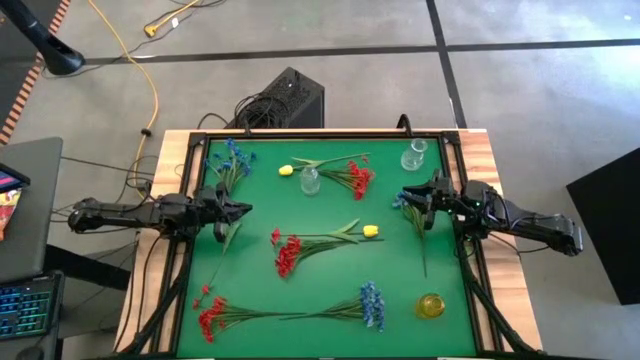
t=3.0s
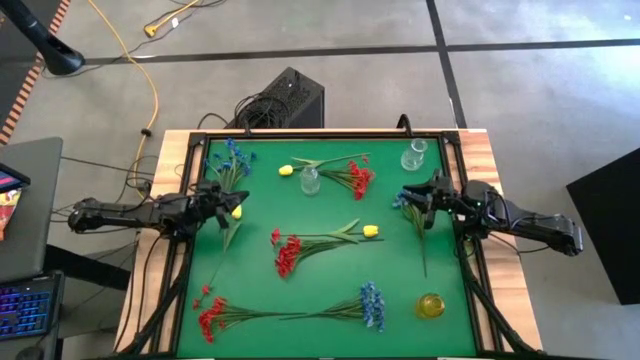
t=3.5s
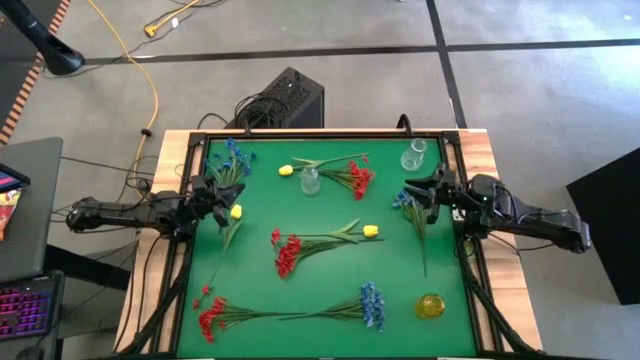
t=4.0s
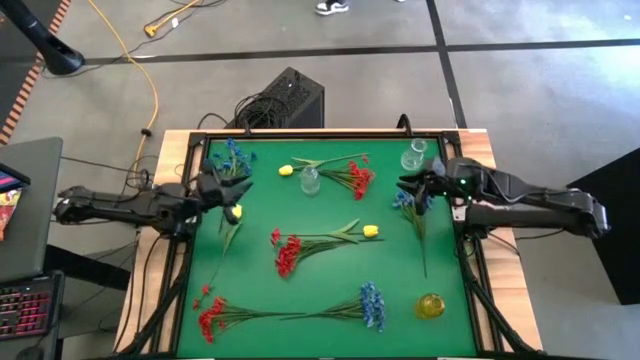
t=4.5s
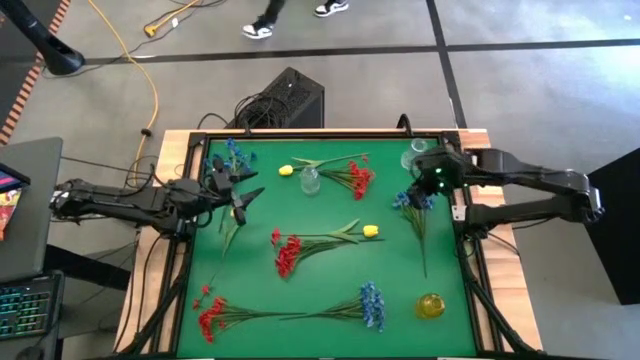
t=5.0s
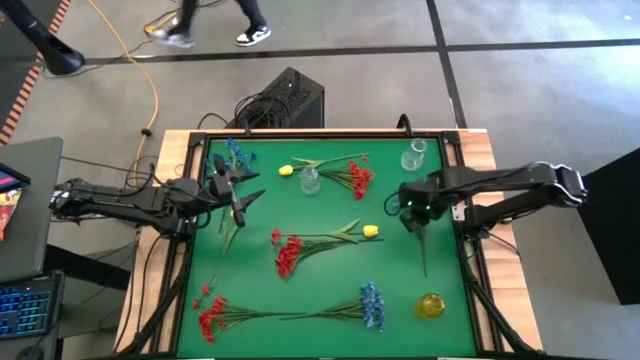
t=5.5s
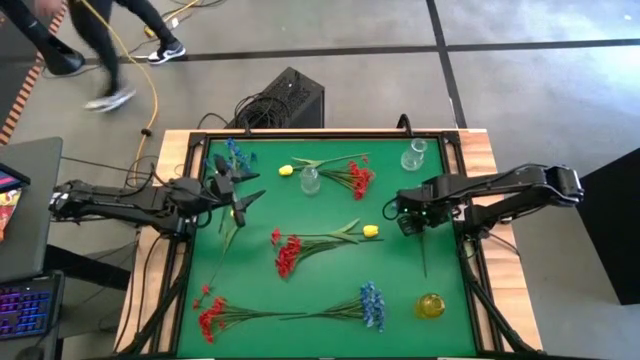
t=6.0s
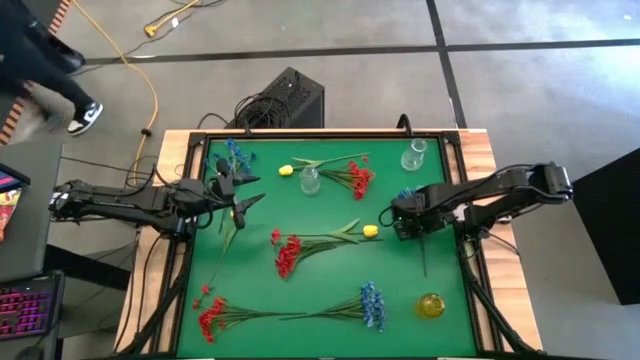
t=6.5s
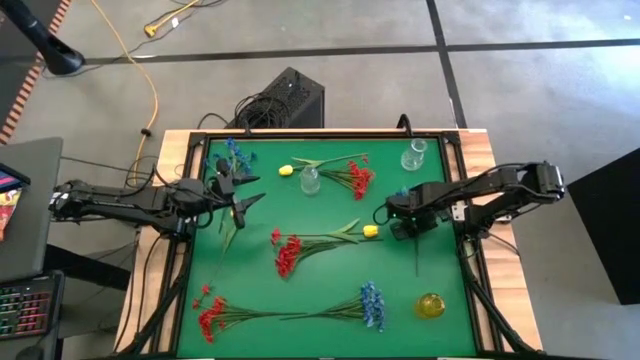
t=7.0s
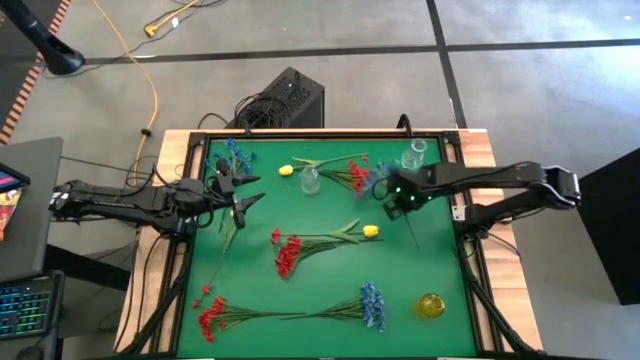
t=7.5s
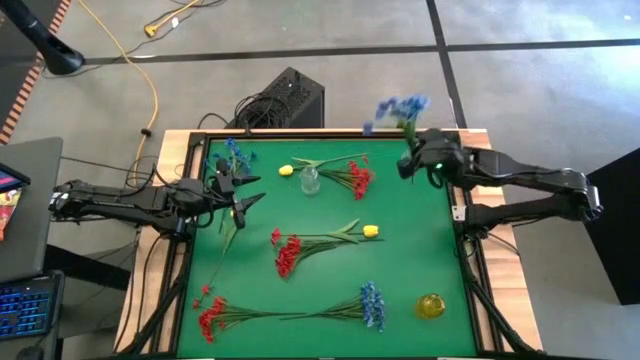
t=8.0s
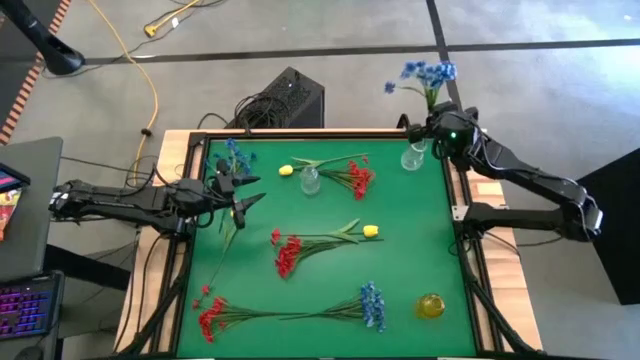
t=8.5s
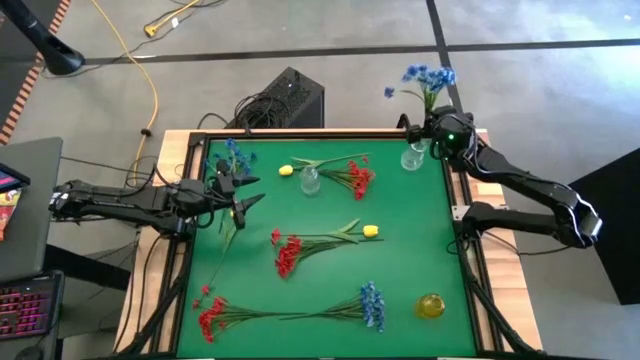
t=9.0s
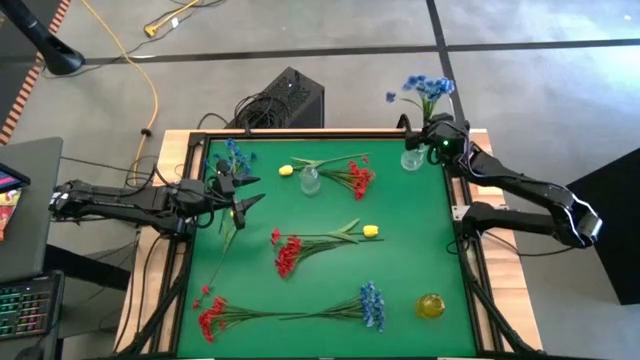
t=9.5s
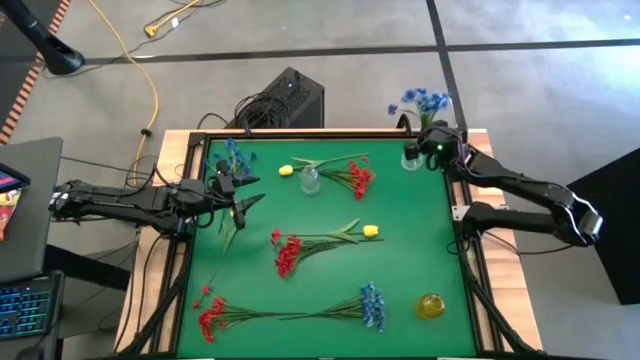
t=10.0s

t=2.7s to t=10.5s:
Task: Sort flowers into vase by color
Put the right blue flowers into the right transparent vase

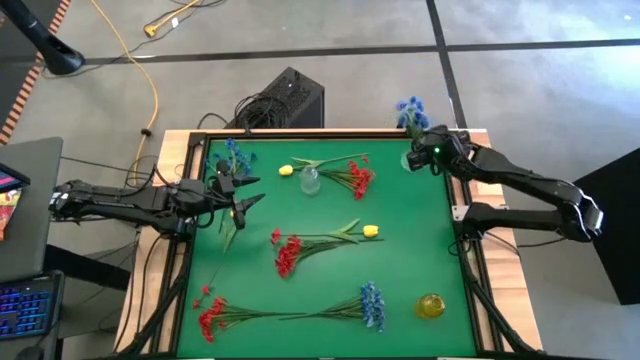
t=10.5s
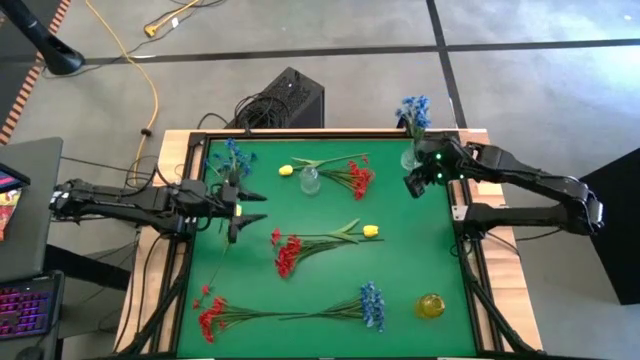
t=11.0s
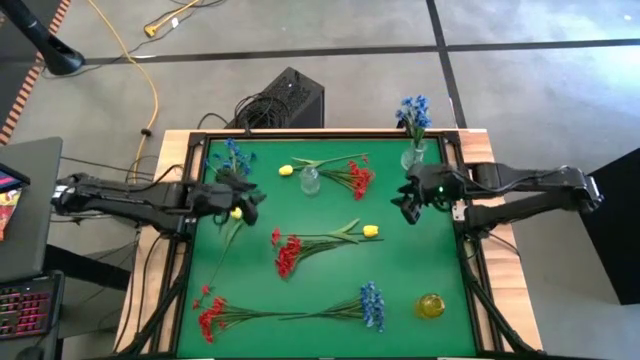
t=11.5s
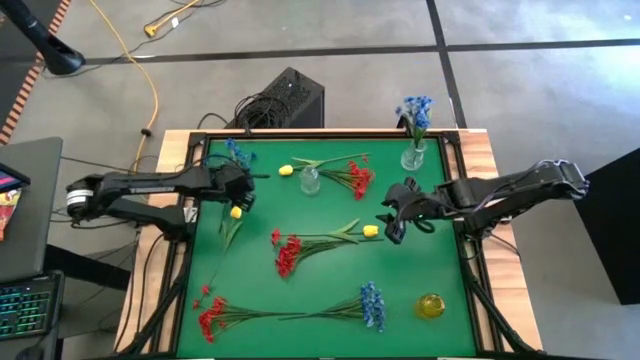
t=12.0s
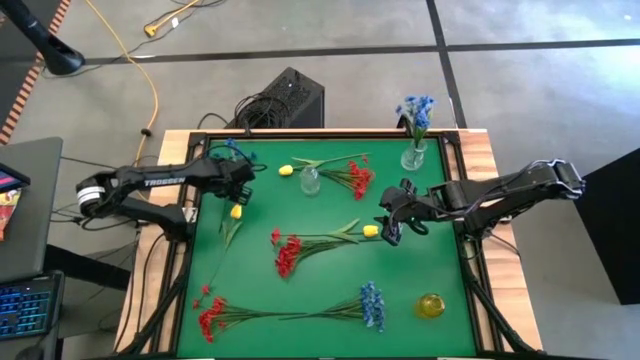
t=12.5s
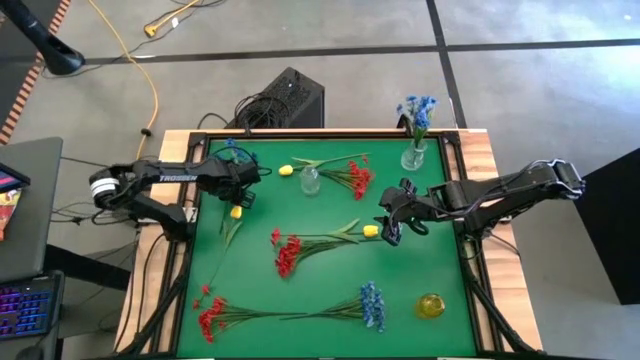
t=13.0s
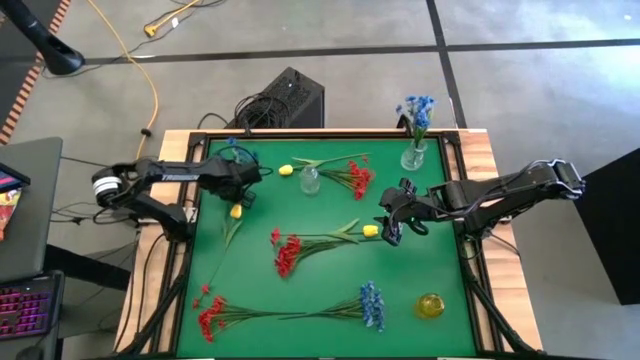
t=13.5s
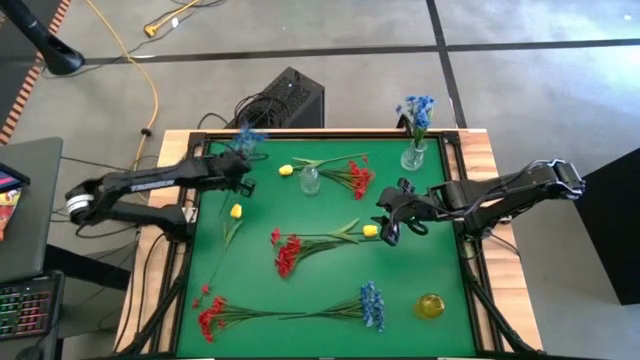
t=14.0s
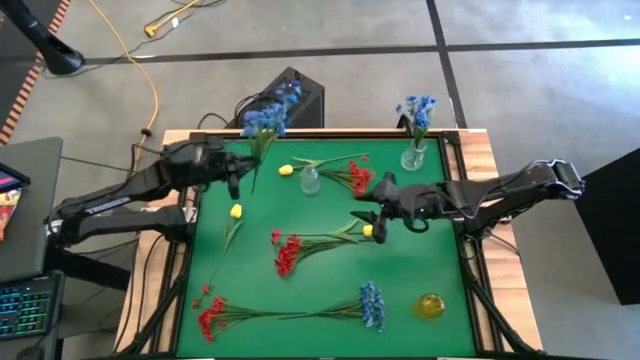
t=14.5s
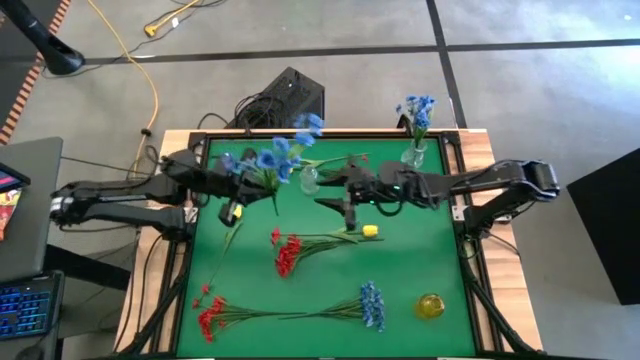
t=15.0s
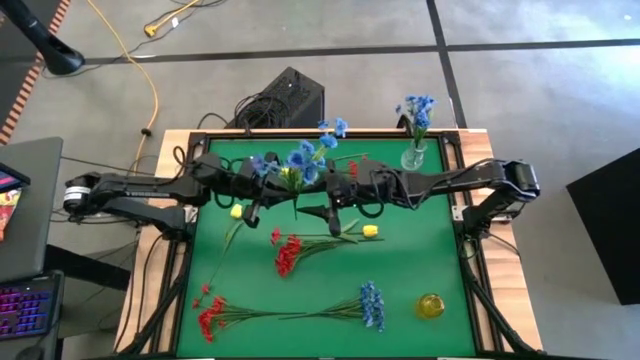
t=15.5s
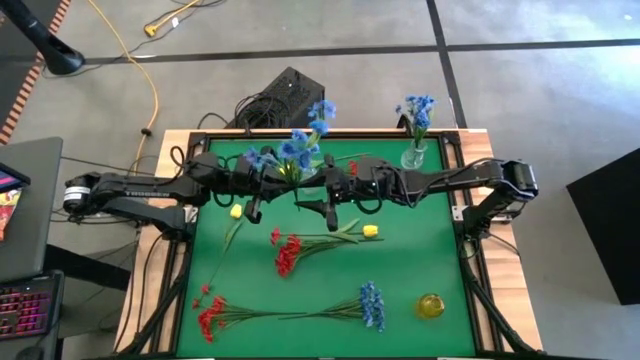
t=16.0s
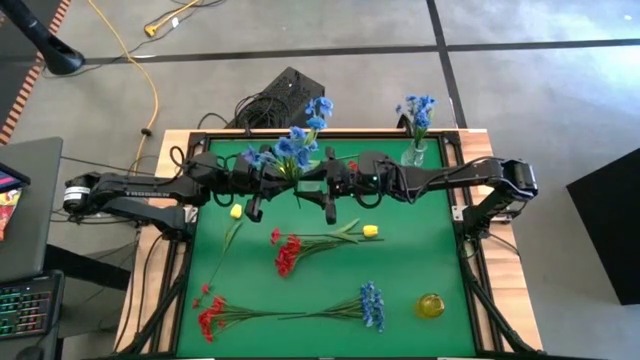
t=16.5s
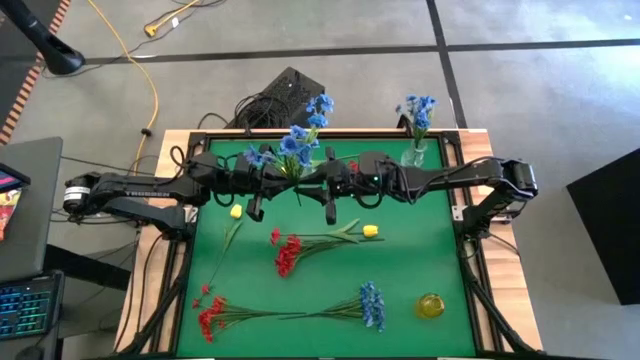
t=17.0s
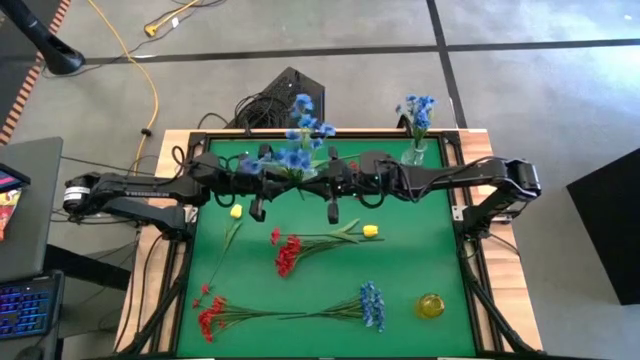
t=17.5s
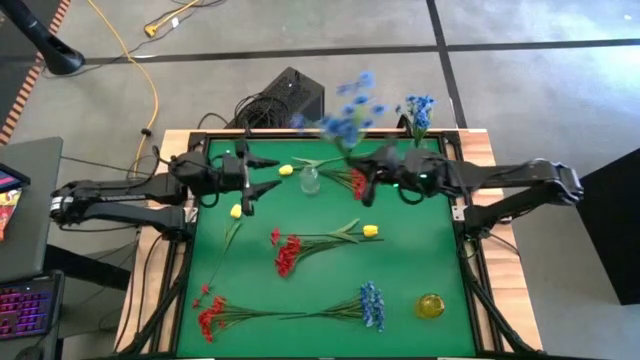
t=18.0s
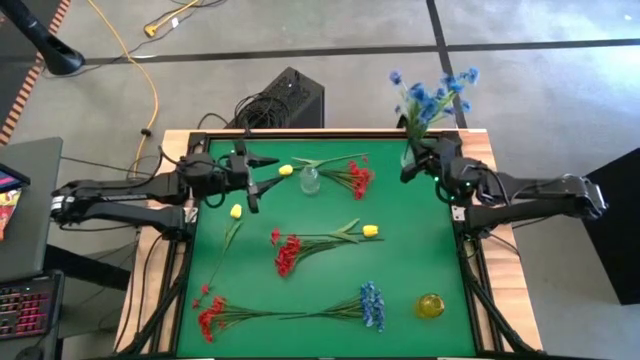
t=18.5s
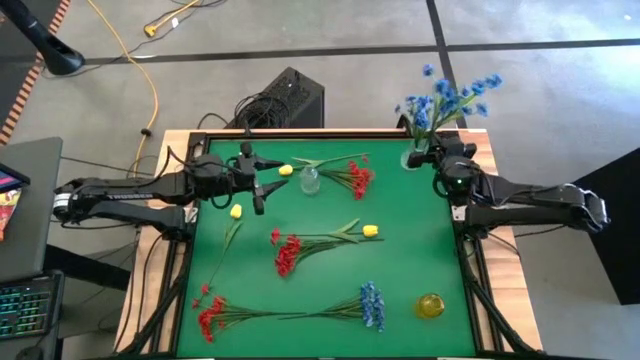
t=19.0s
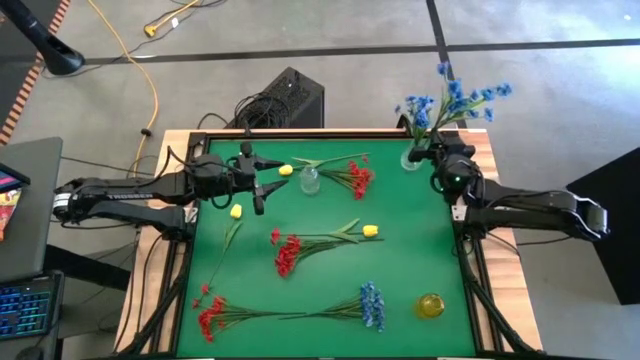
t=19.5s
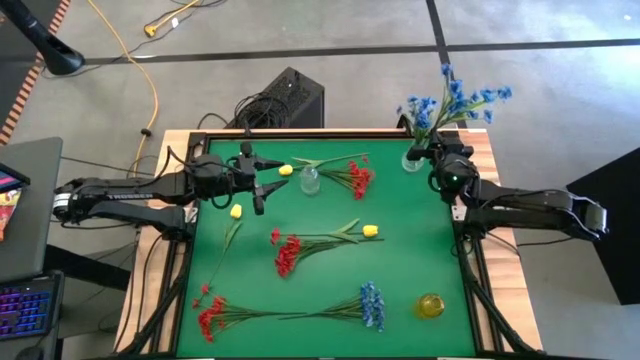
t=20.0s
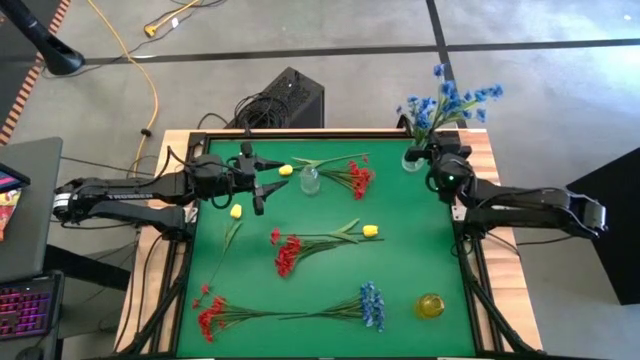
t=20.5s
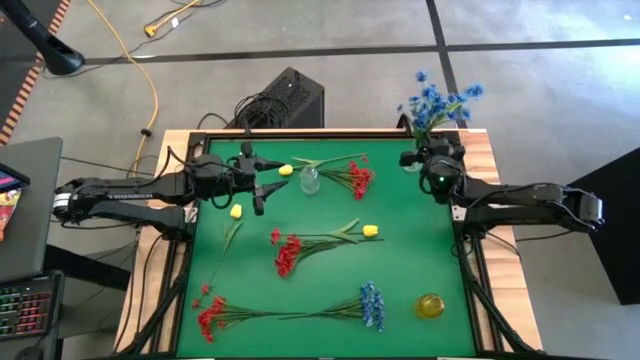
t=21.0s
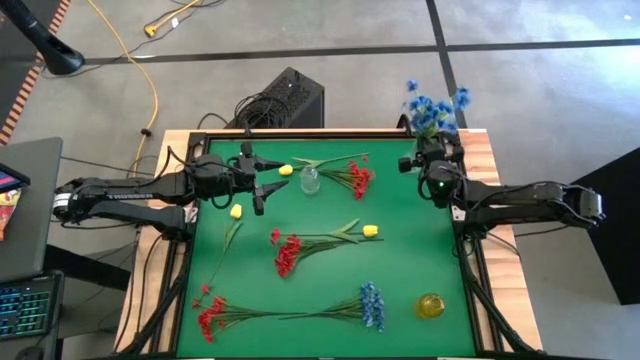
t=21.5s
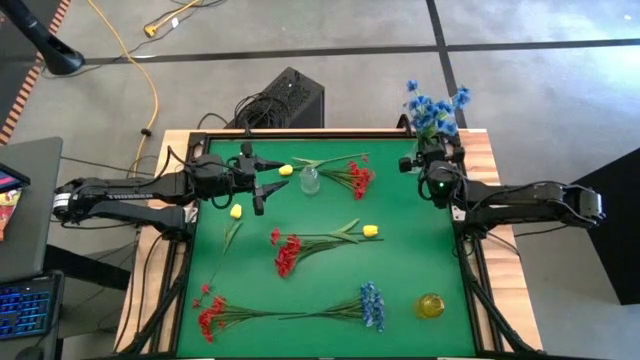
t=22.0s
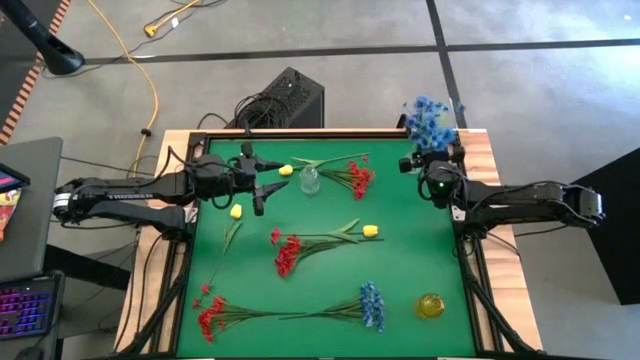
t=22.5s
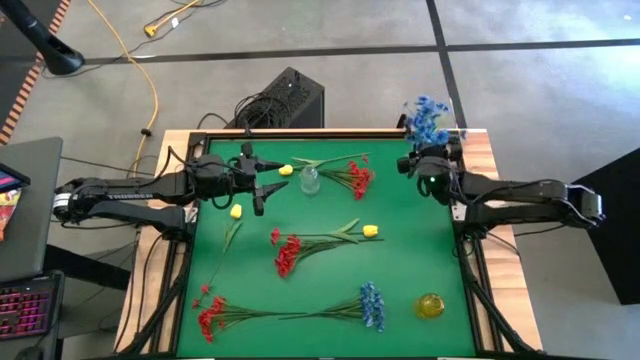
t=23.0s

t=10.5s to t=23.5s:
Put the top blue flowers into the right transparent vase
